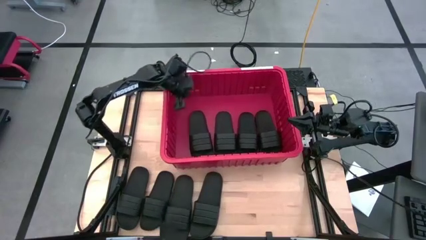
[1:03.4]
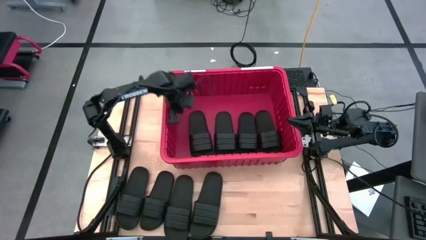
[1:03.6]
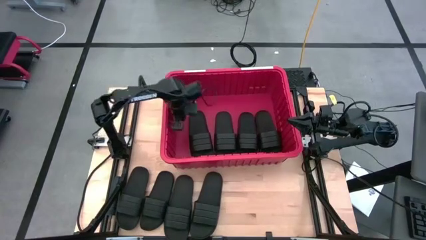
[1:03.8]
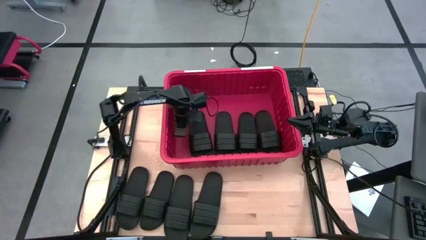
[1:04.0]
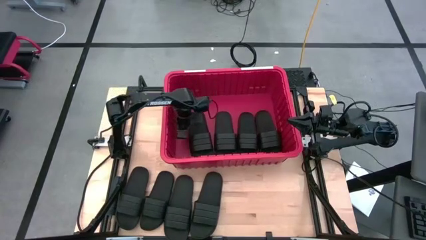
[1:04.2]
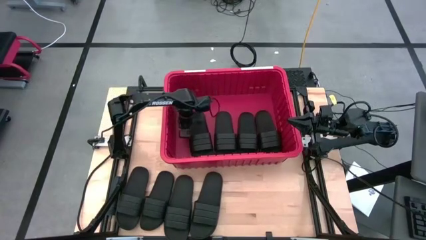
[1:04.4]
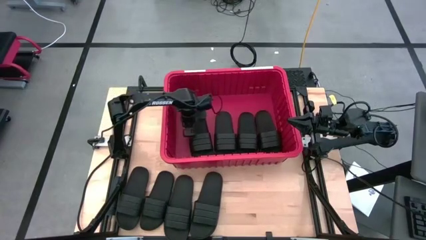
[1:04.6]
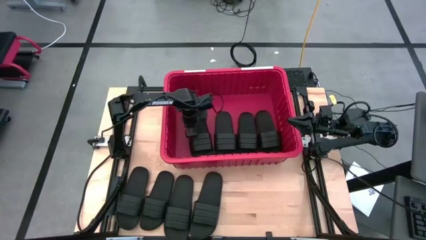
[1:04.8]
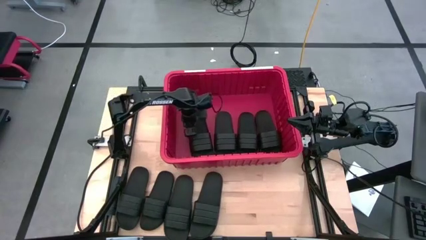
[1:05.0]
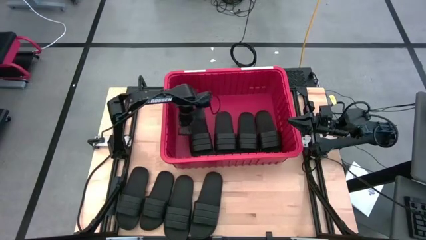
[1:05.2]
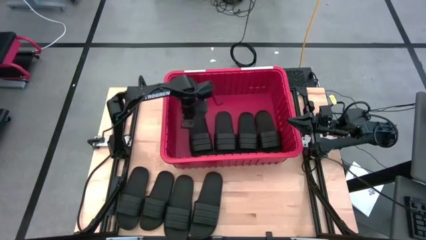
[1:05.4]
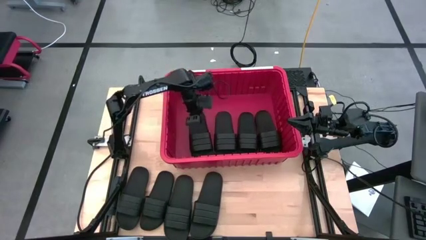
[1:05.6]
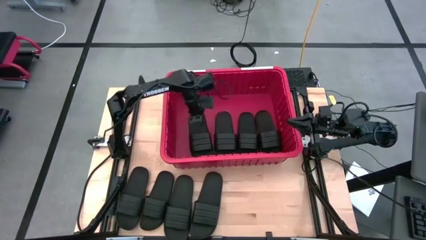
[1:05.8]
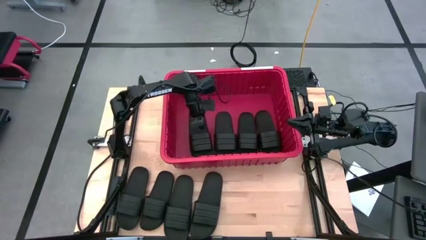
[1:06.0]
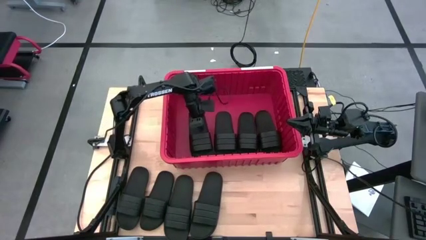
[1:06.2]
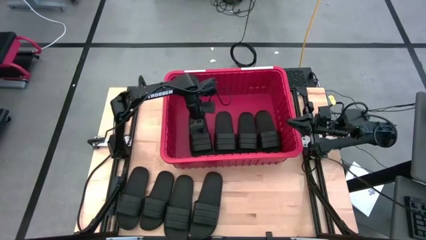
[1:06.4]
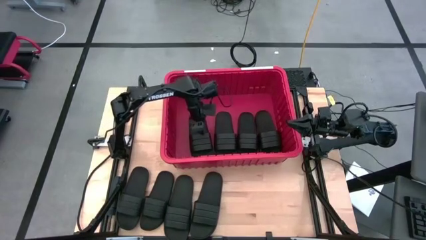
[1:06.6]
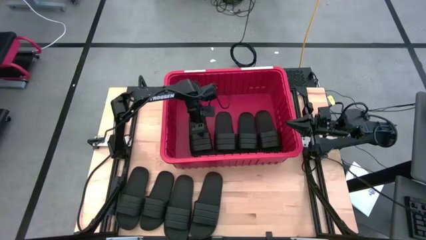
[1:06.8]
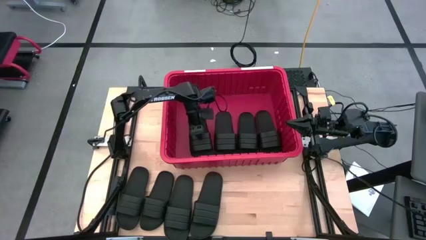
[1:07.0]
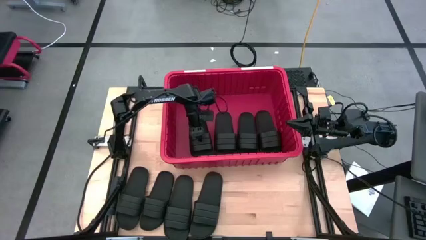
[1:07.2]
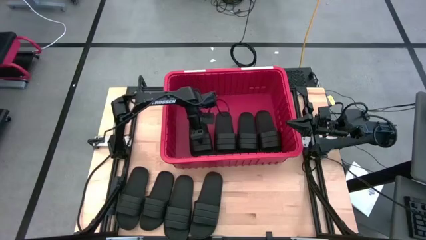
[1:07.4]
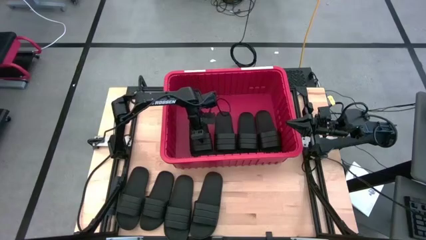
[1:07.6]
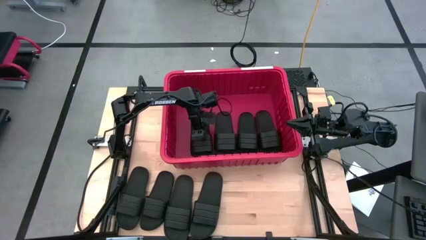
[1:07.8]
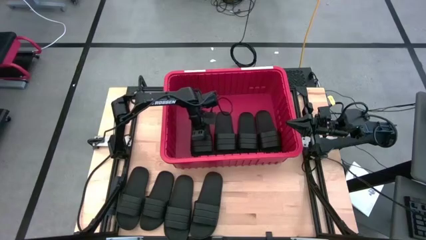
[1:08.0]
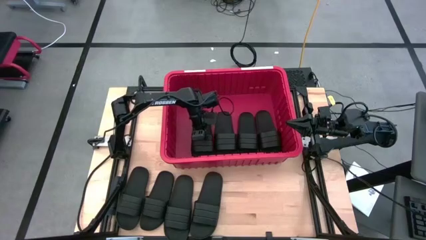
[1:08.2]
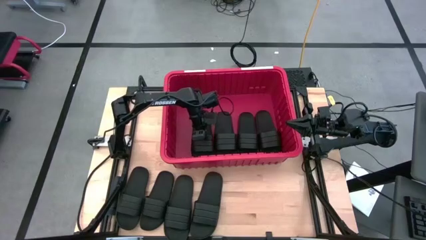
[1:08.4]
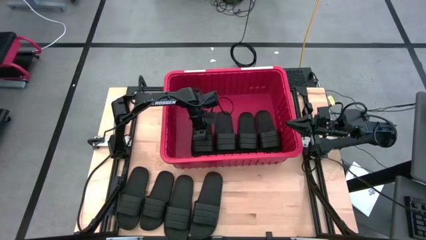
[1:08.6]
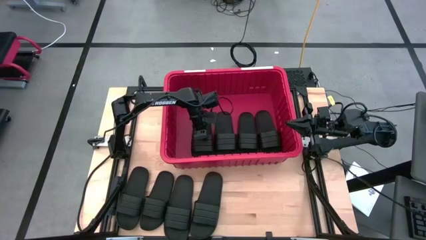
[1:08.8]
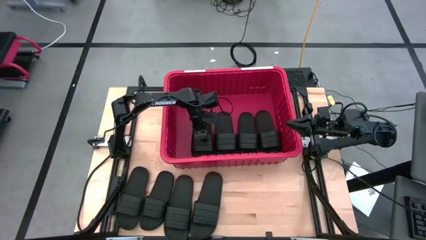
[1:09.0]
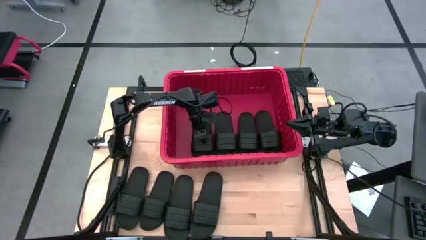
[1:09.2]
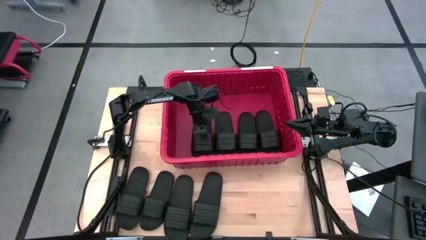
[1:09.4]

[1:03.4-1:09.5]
Task: Pick and place slides into bin
Adjust the black slide in the red bin

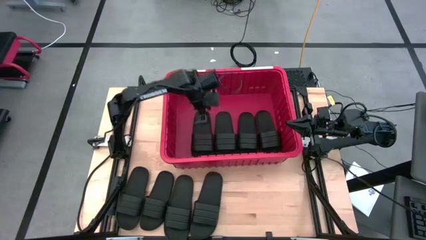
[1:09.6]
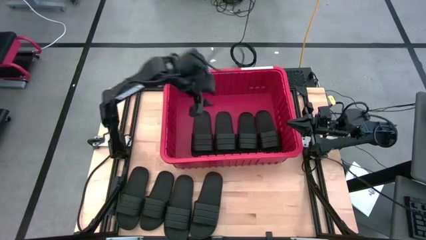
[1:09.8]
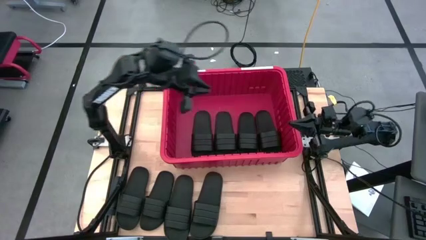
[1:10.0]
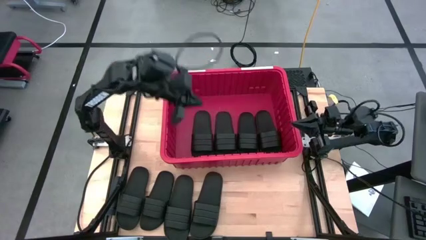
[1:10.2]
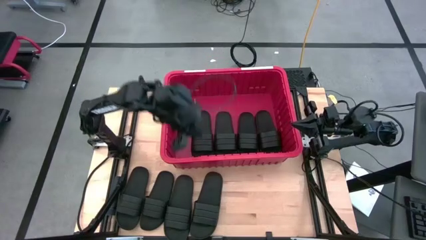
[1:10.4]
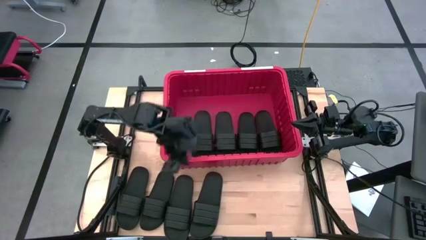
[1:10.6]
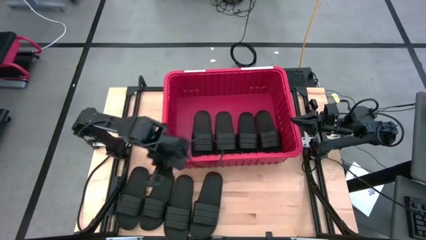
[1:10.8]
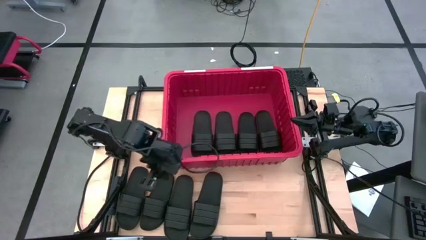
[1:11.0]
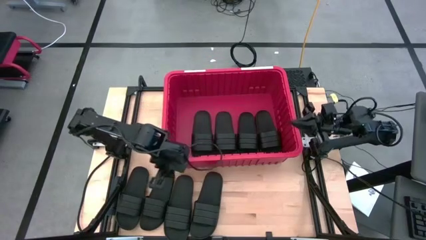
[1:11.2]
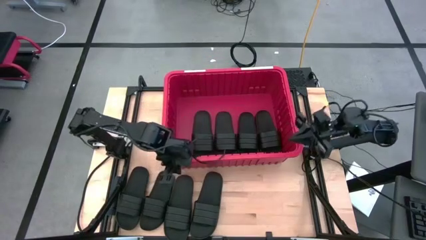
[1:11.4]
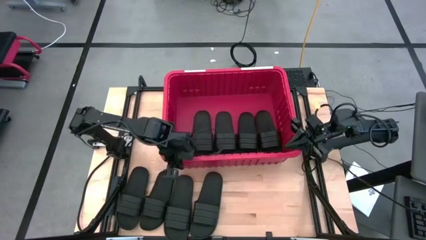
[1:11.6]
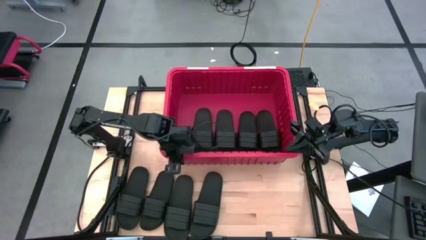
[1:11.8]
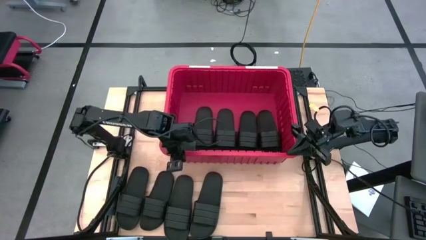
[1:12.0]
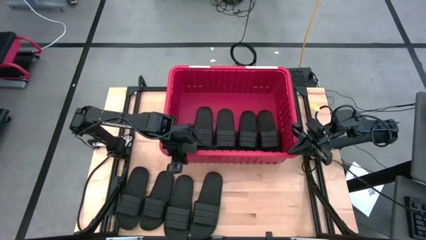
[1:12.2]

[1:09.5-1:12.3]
Adjust the red bin

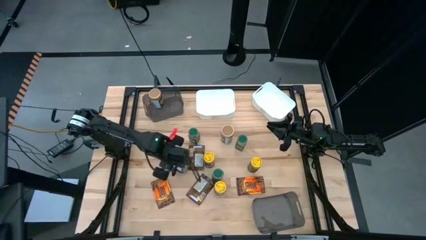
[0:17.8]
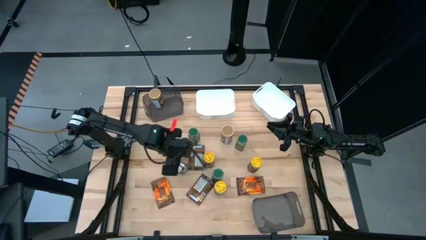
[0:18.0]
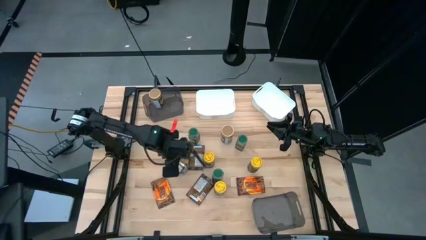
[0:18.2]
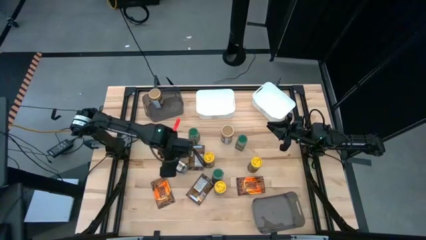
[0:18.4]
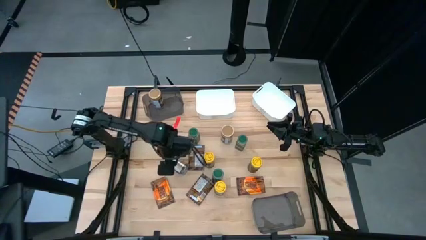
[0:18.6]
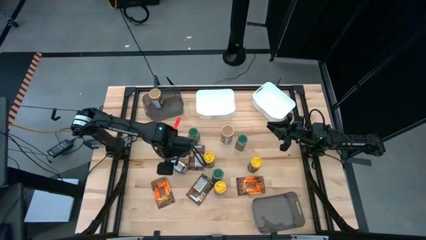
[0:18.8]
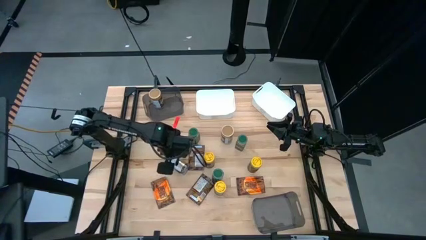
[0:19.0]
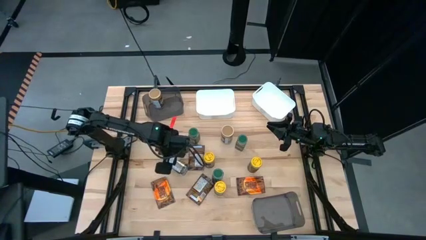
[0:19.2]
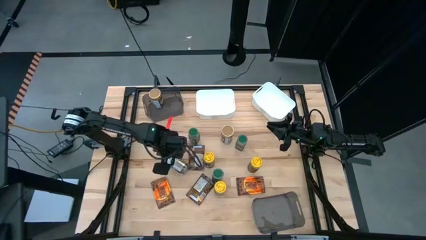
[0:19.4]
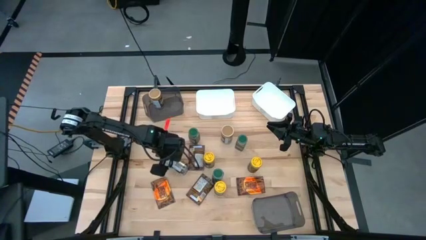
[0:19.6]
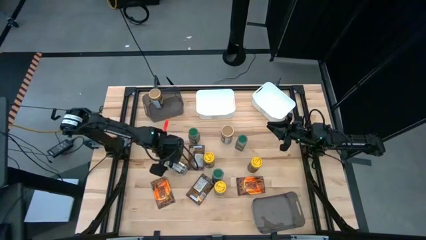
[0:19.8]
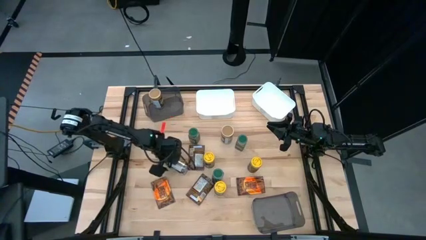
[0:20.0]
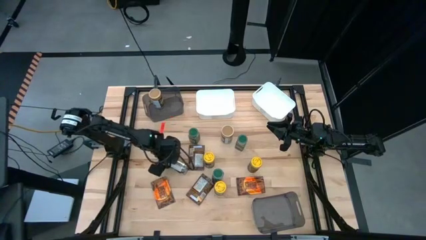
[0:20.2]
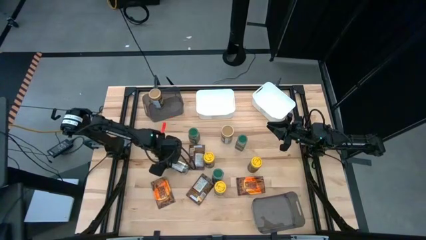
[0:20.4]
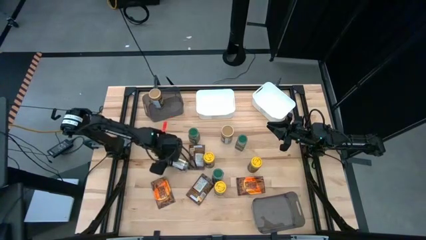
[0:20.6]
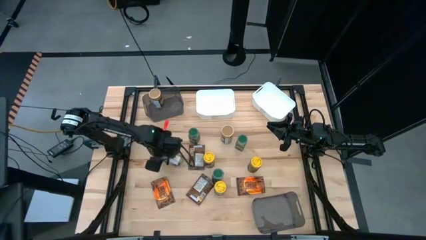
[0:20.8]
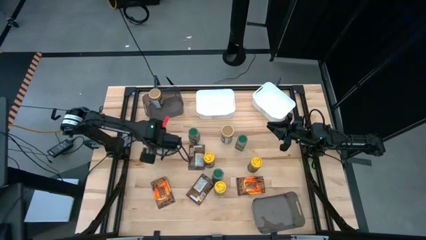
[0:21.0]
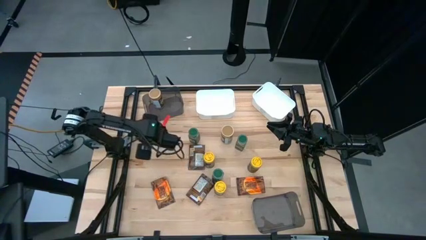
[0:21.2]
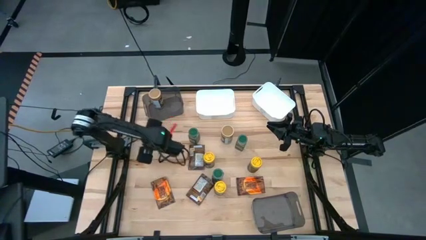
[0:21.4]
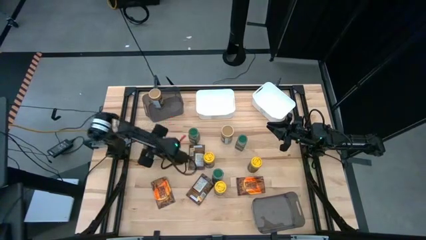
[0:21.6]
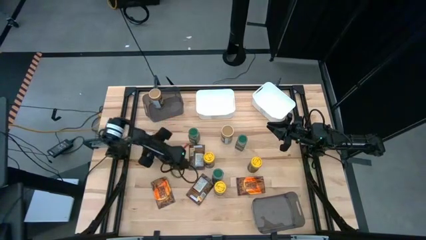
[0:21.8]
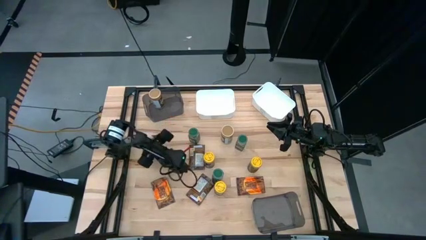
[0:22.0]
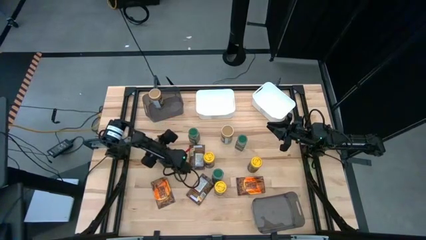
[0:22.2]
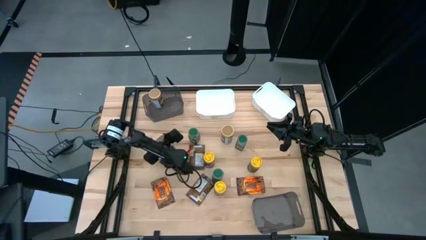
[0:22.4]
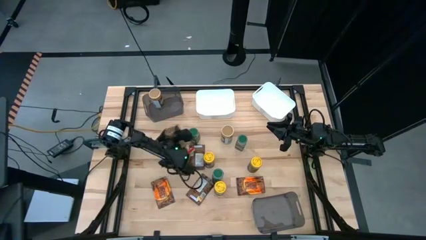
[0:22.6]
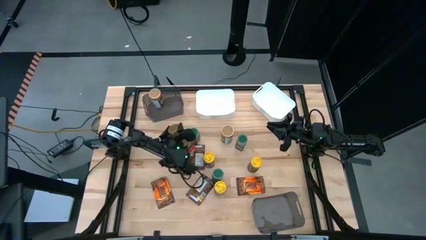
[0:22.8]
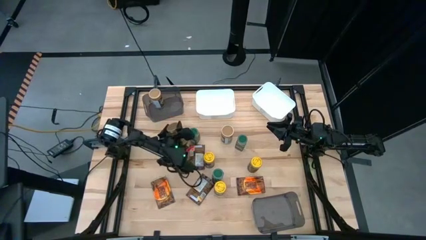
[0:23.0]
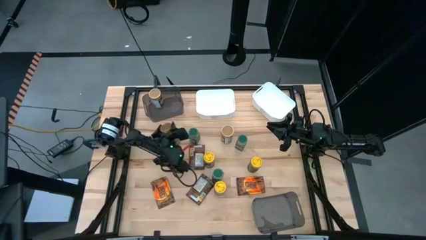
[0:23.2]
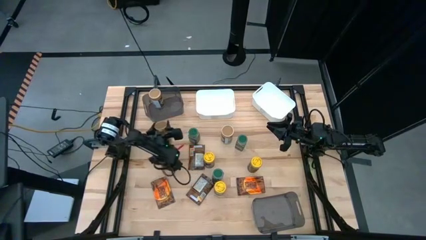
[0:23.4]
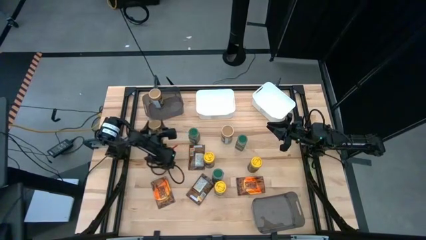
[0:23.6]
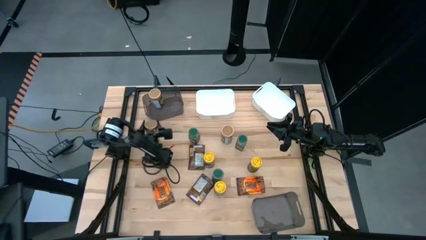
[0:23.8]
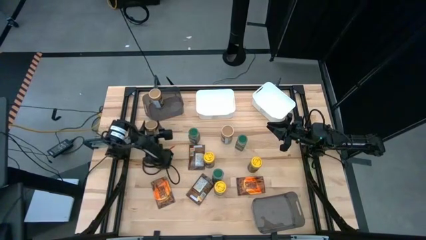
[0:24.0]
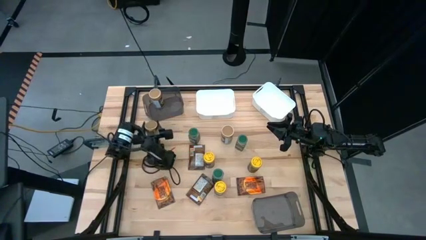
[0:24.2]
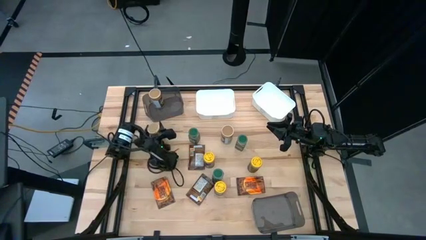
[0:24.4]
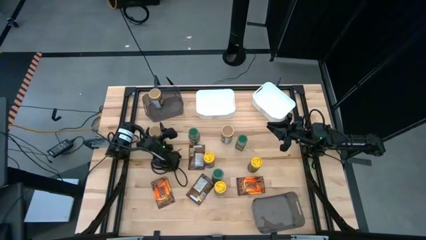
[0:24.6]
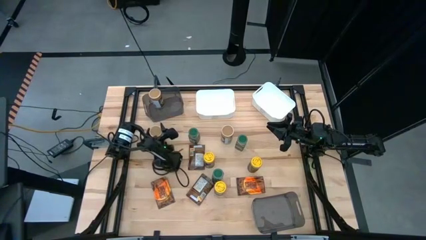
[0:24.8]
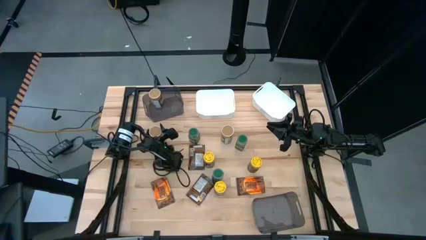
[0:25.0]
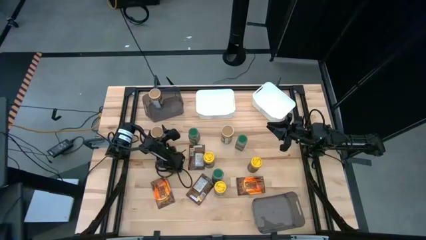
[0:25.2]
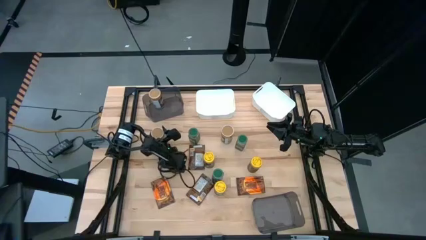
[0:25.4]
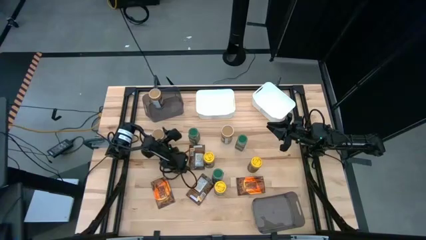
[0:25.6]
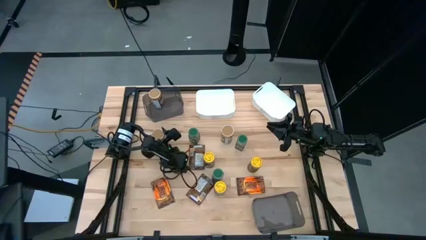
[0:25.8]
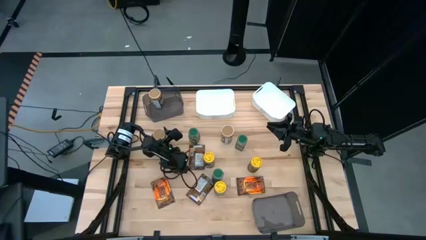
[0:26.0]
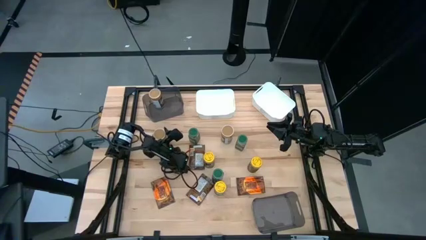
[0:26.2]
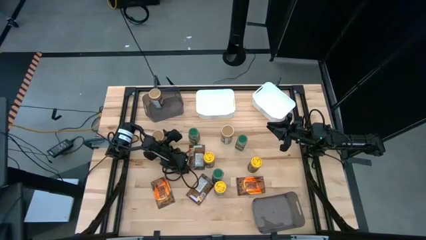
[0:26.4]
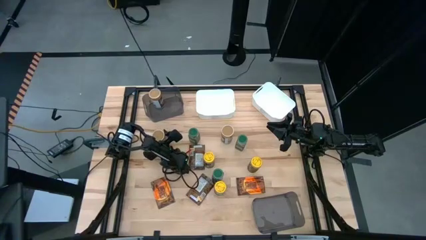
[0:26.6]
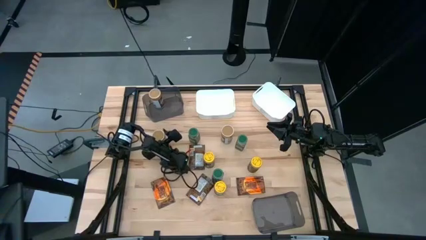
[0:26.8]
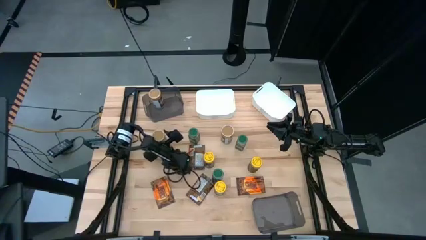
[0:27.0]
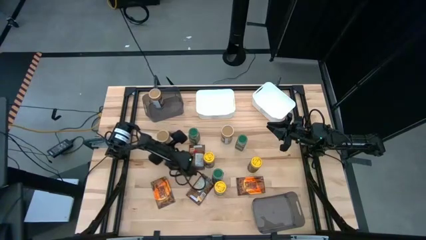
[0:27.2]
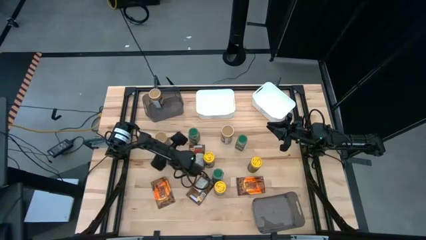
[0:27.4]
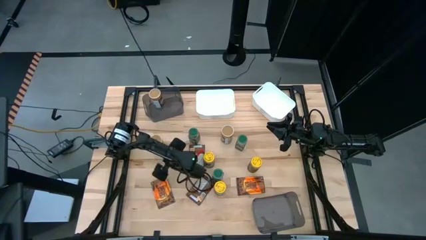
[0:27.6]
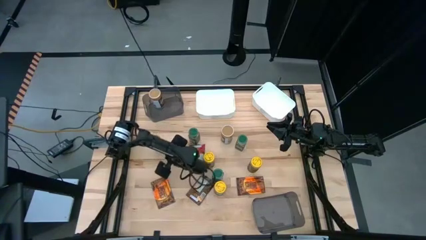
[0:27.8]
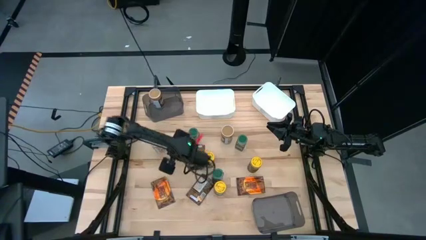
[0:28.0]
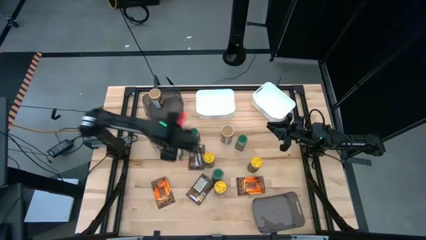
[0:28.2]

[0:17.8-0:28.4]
Task: Sort spices by type
Put the gold seasoning bottle into the top black bin
